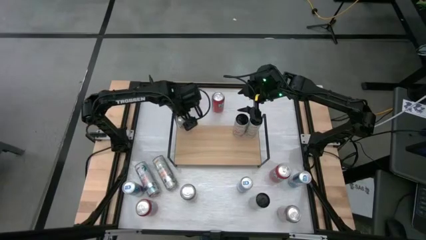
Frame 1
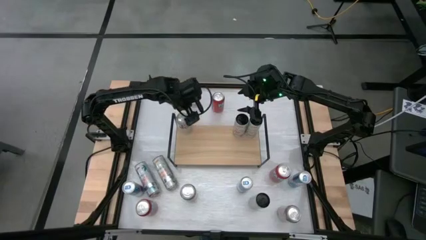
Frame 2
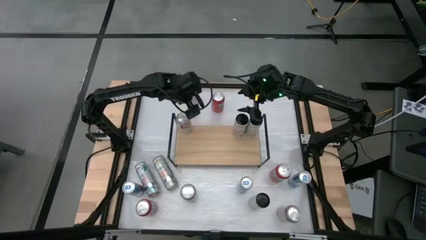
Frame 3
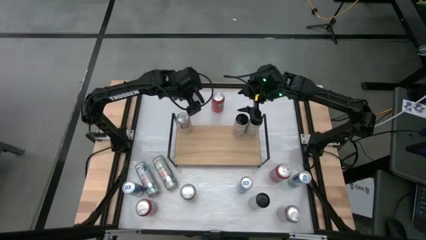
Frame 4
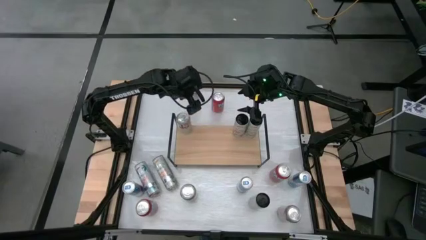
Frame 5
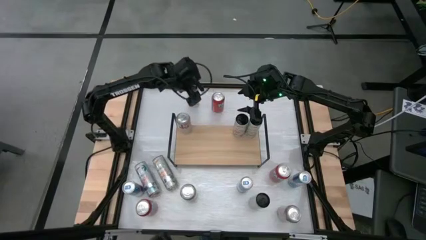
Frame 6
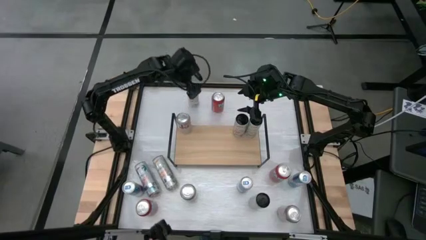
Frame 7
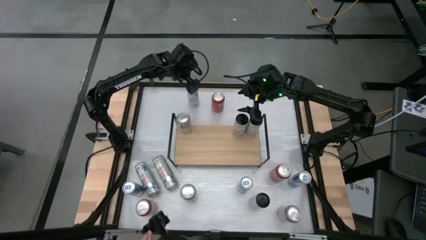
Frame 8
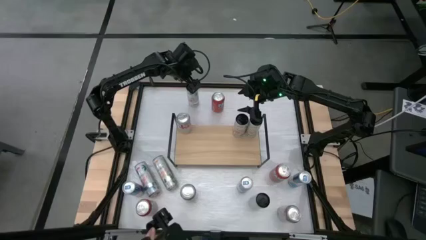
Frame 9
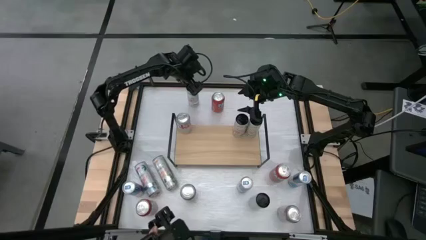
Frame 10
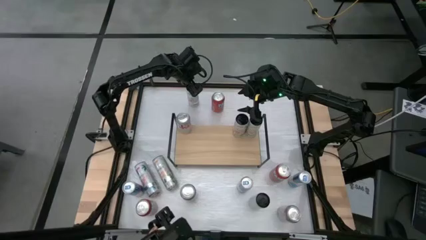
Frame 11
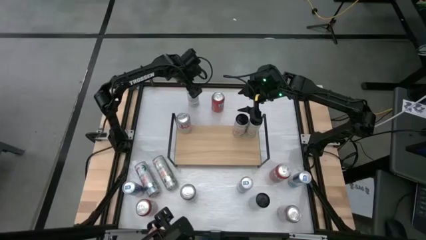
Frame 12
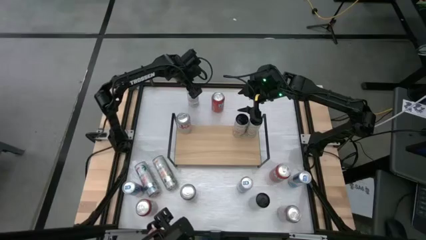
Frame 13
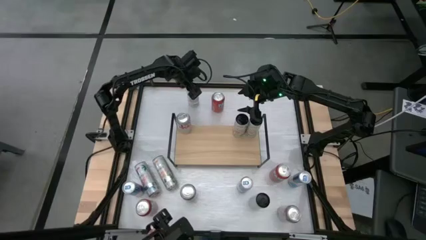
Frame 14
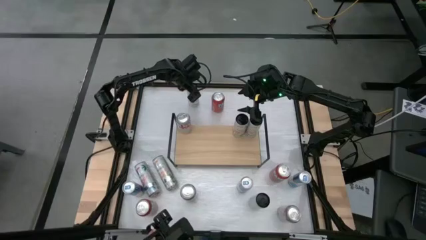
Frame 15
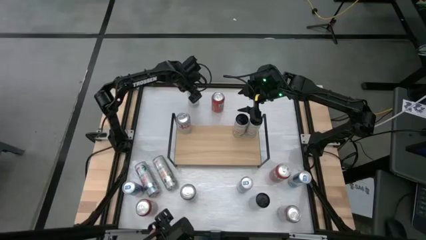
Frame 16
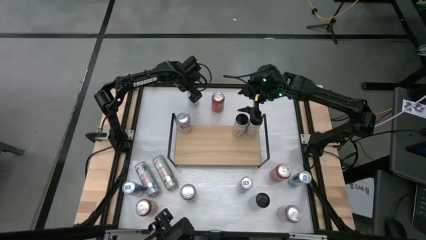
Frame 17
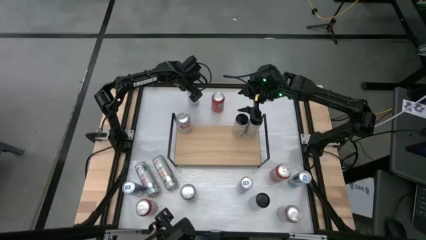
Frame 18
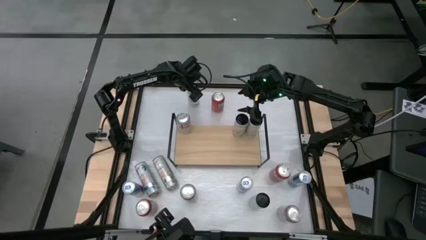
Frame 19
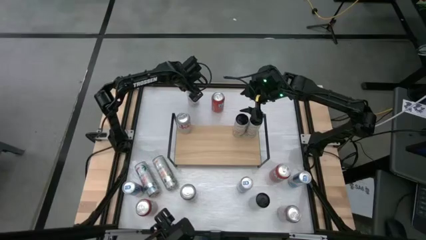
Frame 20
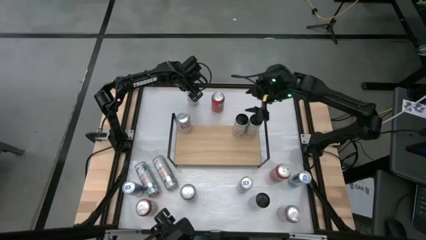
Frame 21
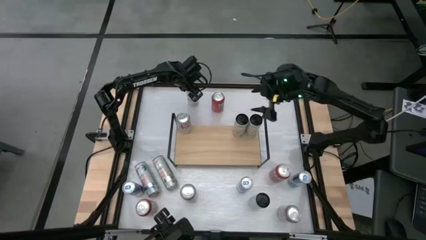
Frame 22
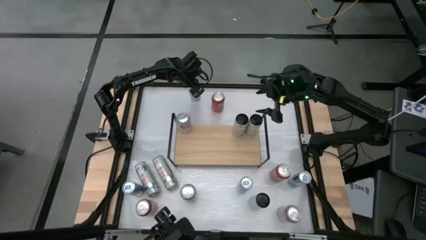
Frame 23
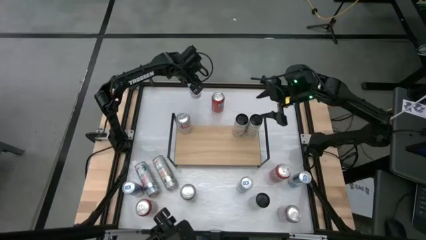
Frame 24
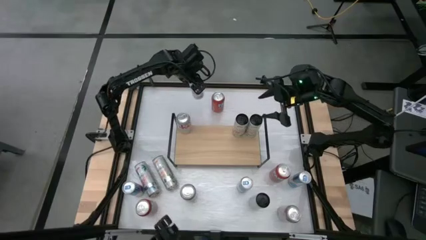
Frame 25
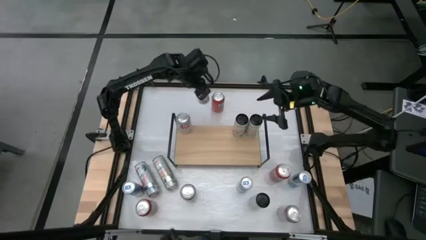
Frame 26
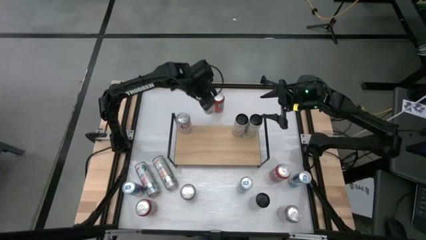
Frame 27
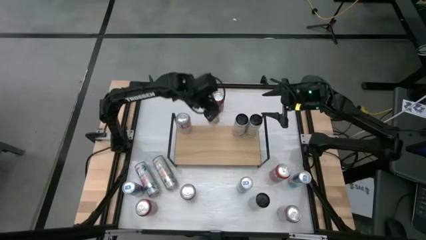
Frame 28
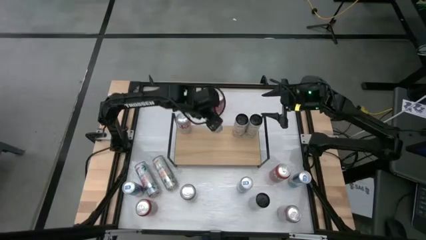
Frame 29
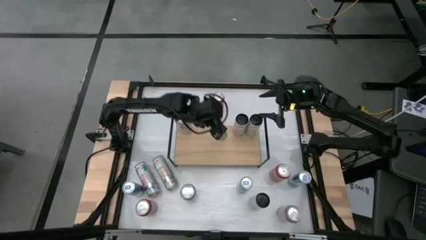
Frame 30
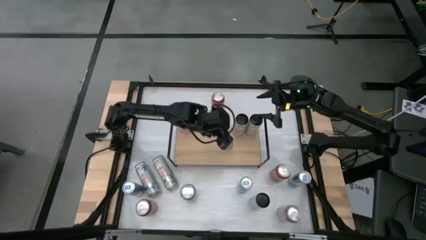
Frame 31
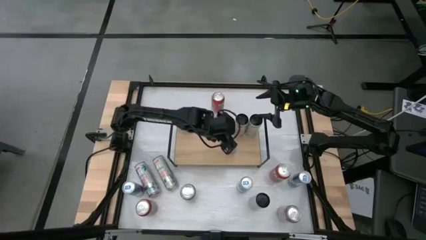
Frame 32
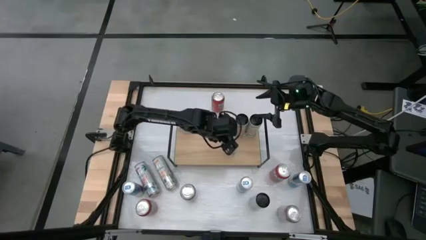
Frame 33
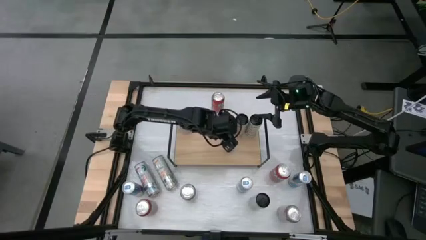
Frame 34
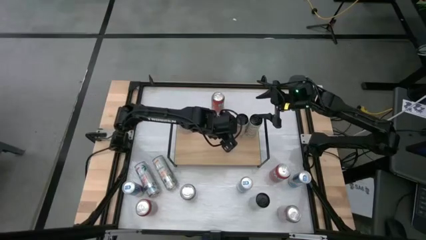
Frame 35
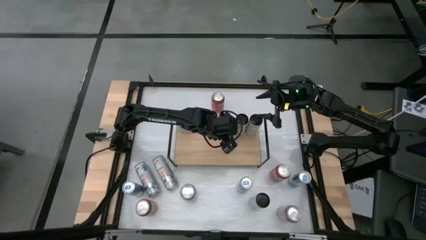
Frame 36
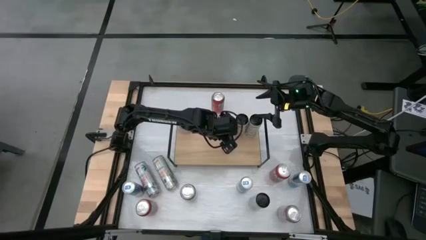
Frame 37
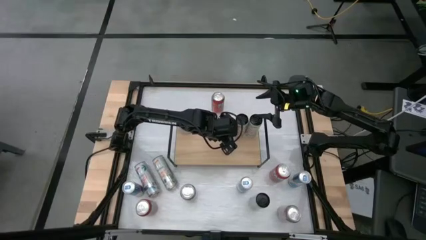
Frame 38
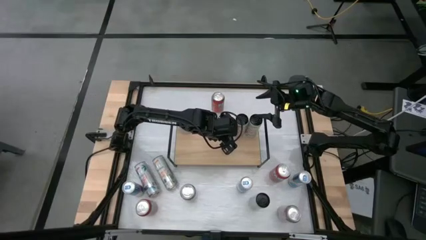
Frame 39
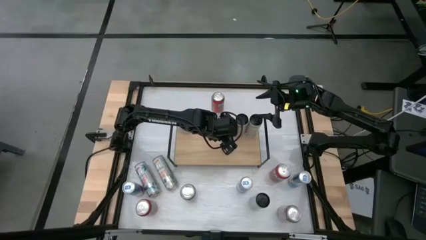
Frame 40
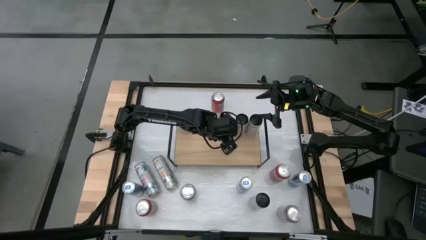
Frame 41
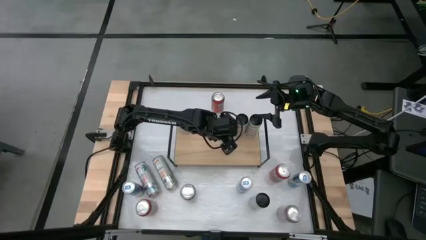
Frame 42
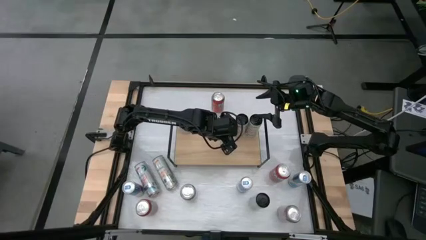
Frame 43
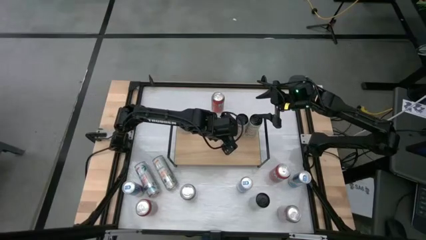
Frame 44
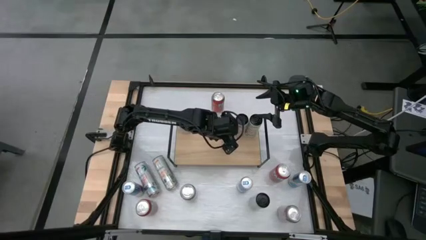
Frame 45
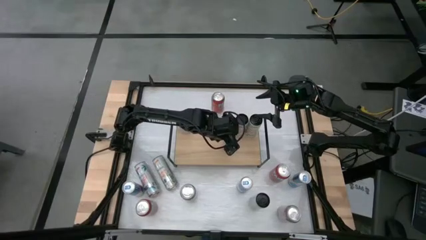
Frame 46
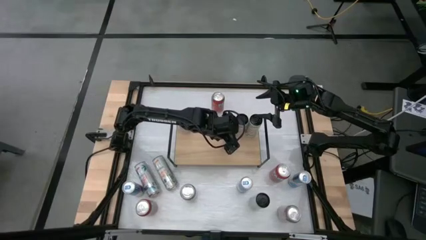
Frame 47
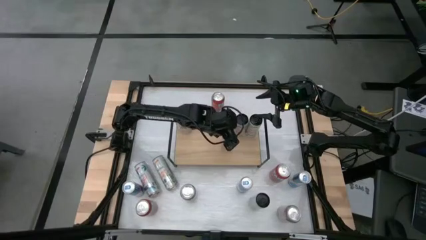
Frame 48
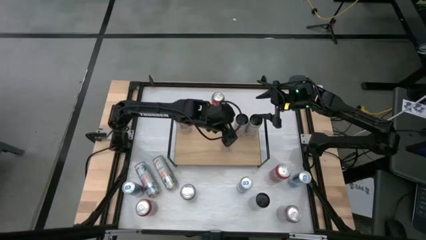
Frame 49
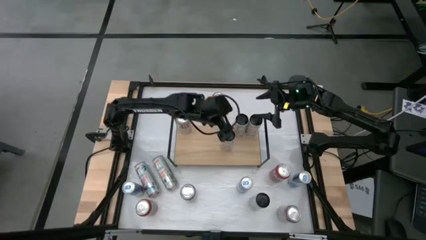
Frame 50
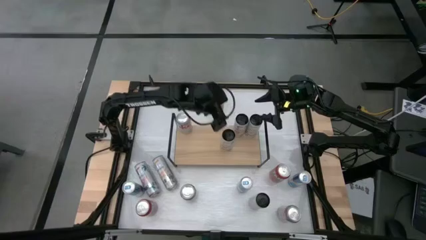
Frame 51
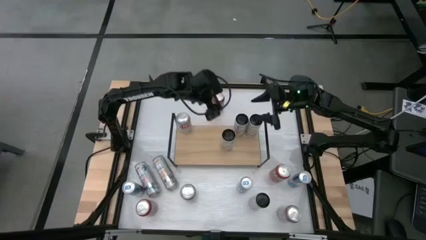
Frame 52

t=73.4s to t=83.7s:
Task: Place canned beverage on shelf
Put the top left white-pink soda can on the shelf aligned with other white-pink soda can
